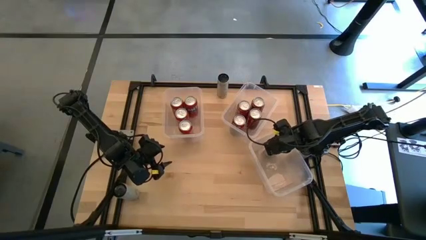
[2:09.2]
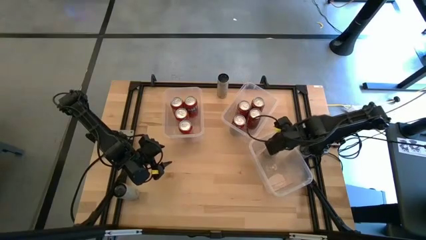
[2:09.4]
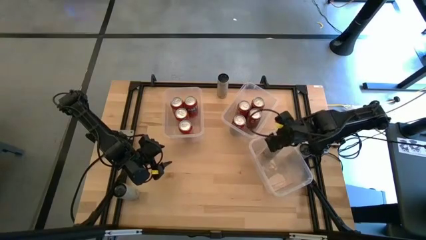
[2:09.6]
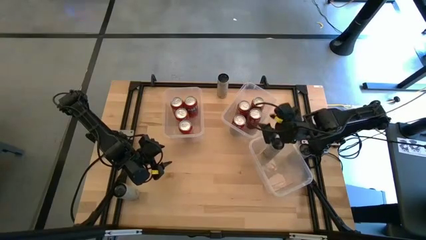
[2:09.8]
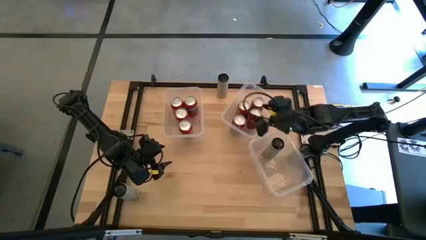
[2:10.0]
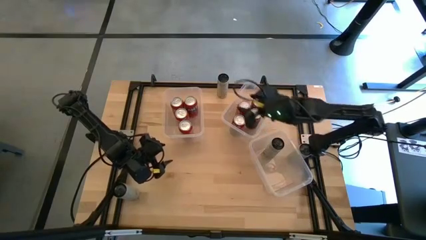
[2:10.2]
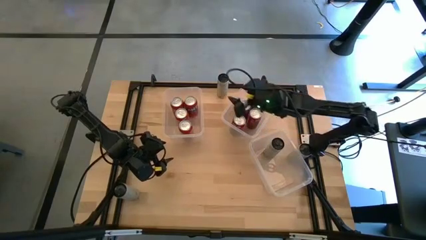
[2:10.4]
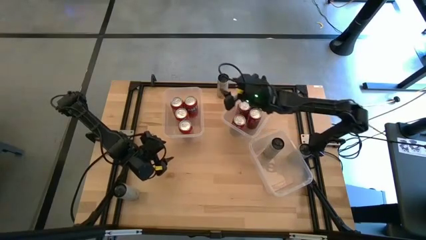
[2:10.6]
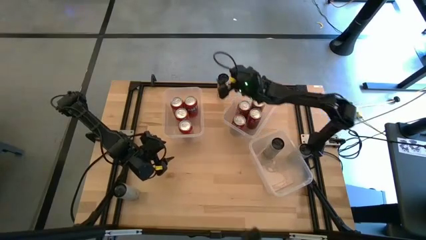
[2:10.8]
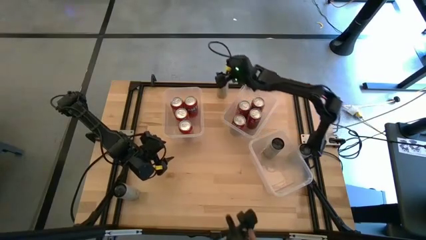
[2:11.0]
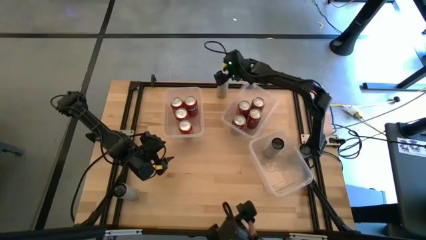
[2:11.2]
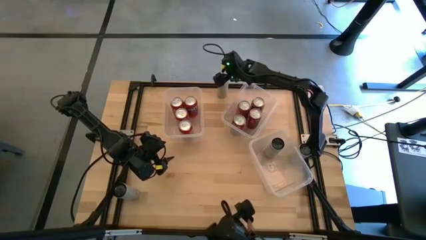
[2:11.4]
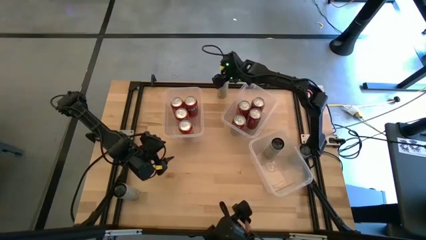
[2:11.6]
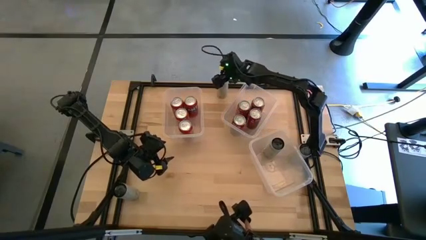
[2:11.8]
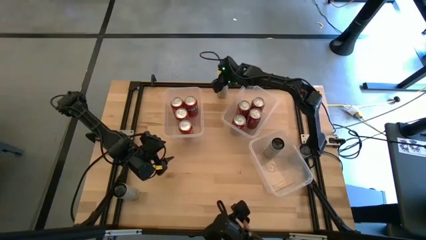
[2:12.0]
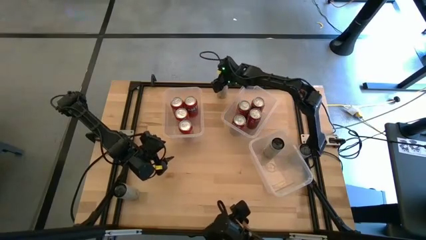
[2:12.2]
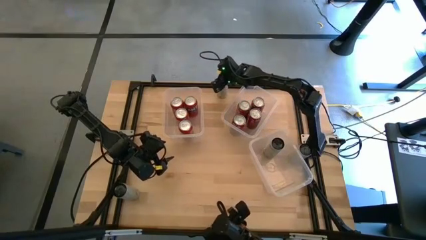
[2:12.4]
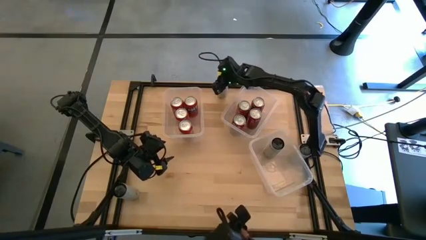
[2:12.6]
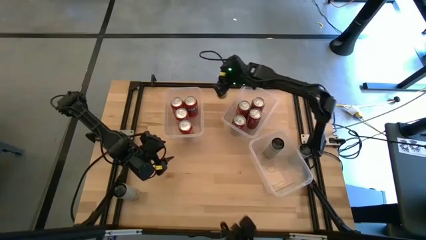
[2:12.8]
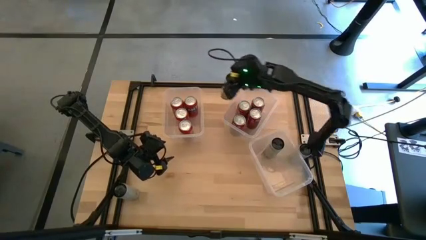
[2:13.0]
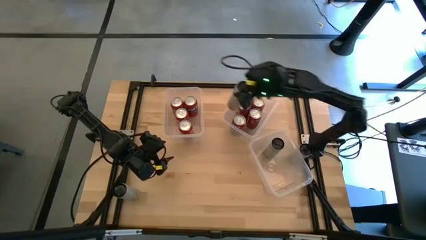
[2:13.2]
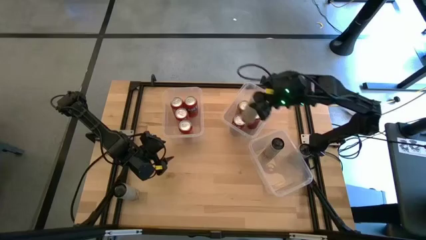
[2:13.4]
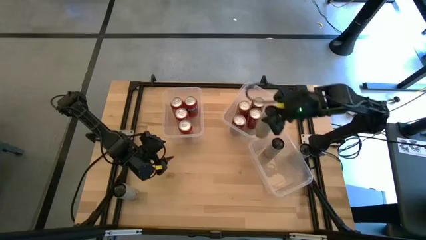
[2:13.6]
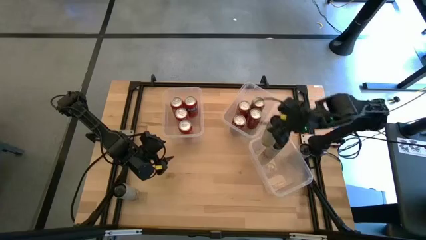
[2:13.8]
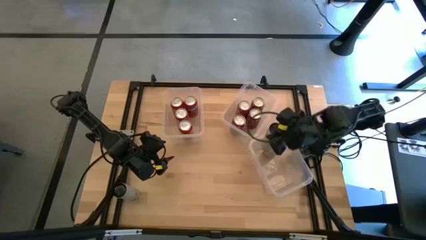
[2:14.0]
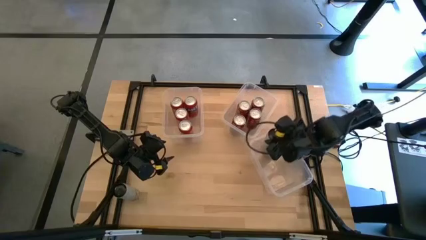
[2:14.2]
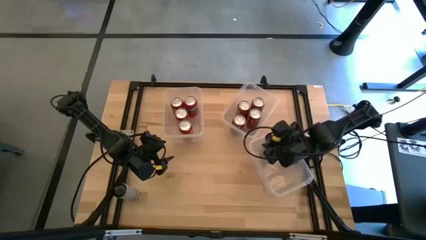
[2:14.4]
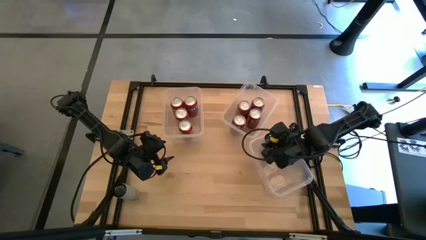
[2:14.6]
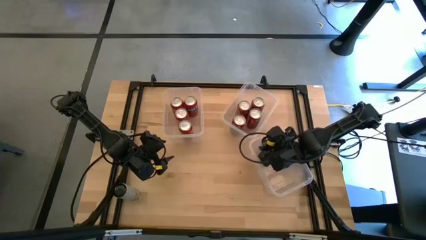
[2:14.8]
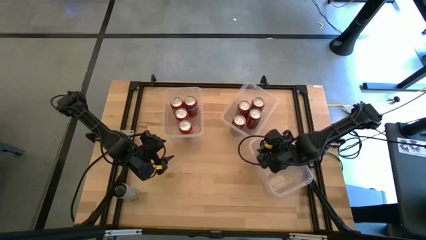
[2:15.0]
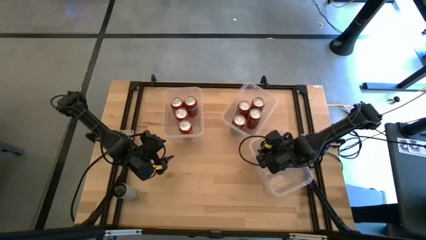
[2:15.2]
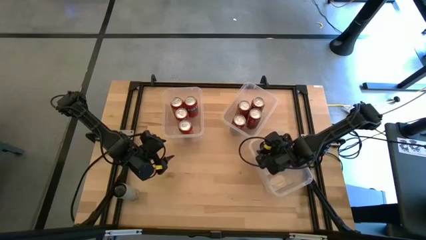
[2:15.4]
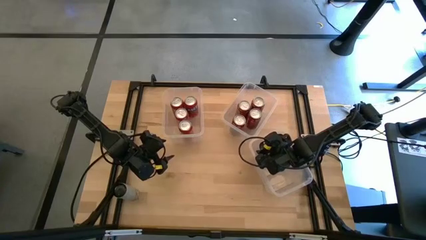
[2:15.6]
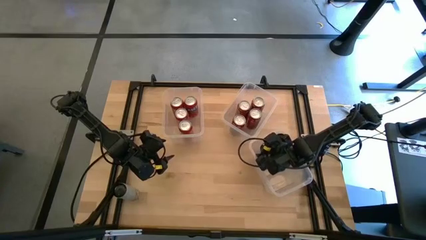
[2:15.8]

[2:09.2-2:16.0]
Task: Sort soda cans
Put the white-yellow soda can into the bottom transparent bin

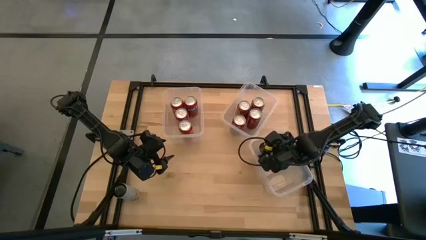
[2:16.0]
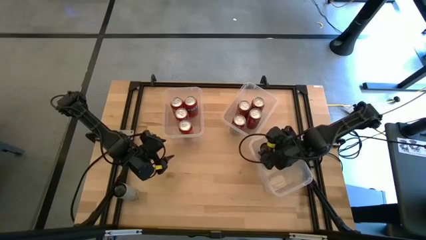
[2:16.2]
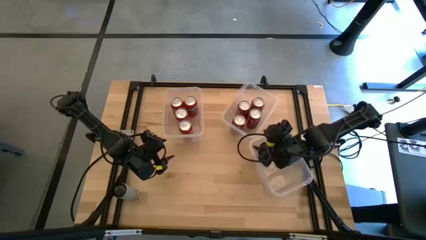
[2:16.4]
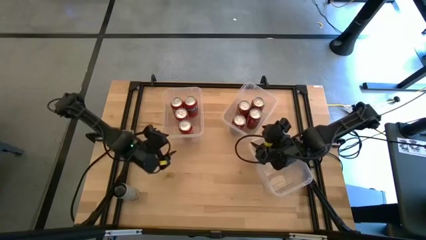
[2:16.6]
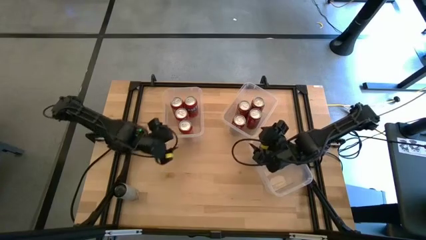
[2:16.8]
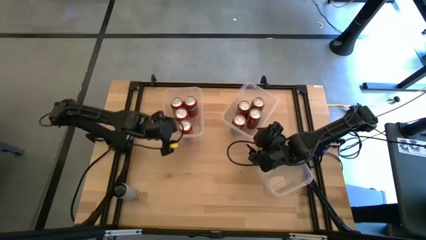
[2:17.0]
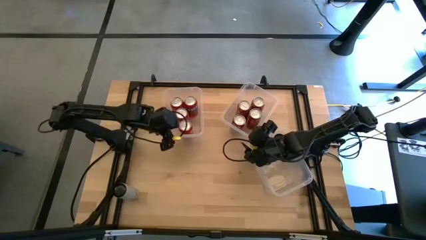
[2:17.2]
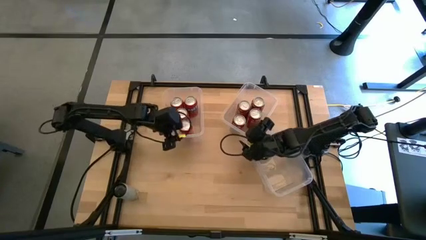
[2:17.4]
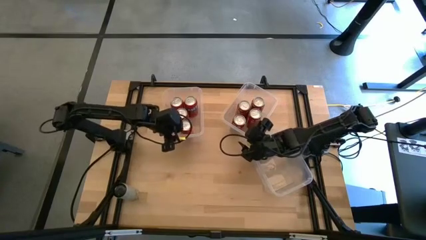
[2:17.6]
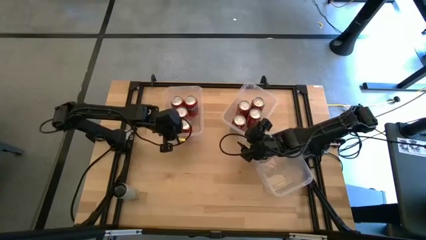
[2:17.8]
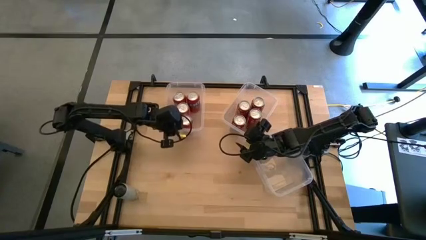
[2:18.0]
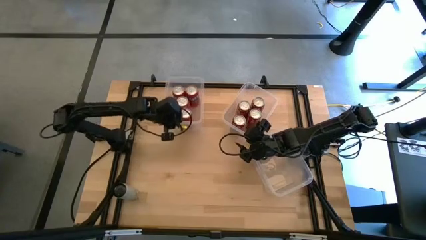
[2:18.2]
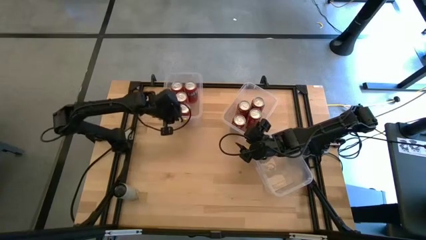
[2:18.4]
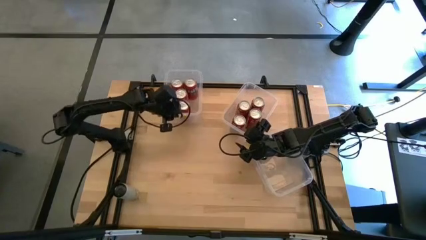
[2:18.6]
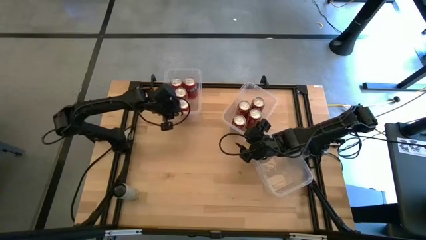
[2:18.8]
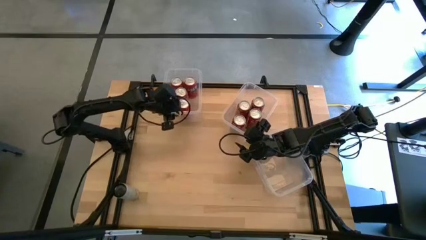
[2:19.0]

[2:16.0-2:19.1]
Adjust the top left transparent bin

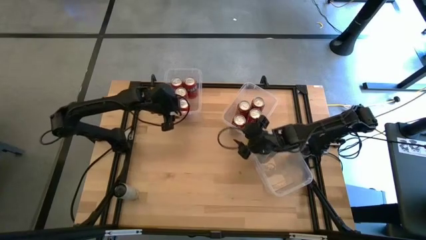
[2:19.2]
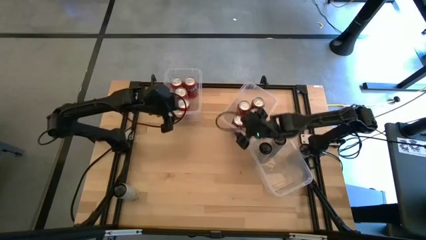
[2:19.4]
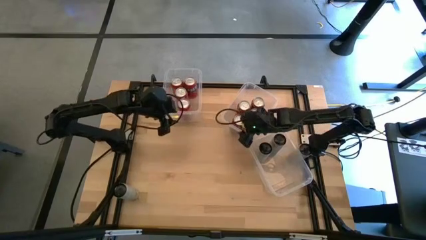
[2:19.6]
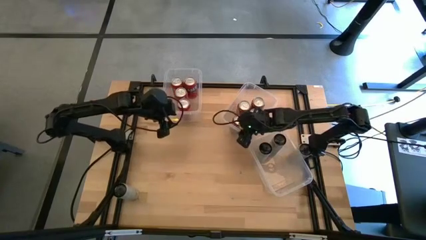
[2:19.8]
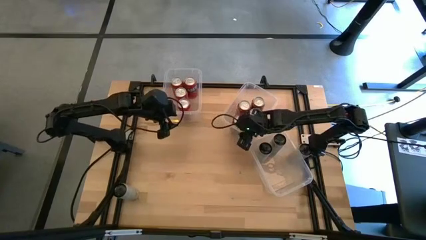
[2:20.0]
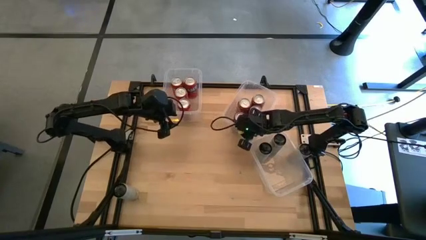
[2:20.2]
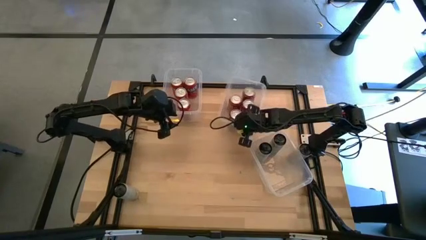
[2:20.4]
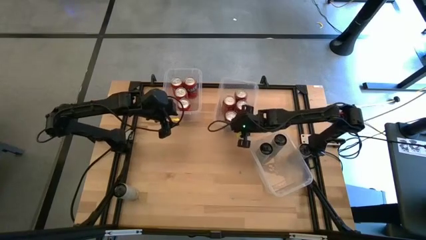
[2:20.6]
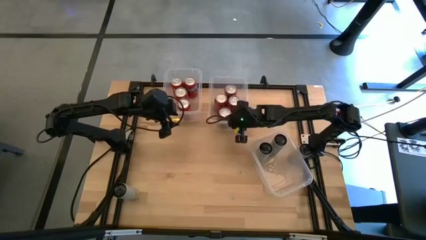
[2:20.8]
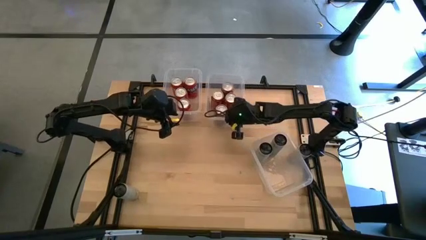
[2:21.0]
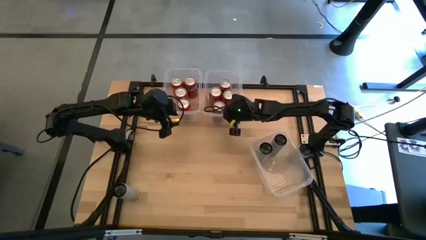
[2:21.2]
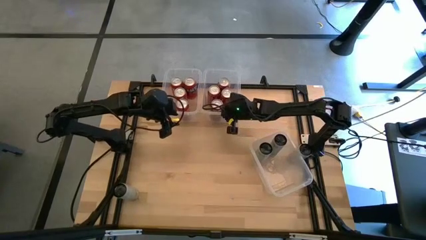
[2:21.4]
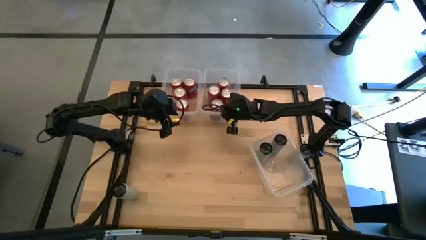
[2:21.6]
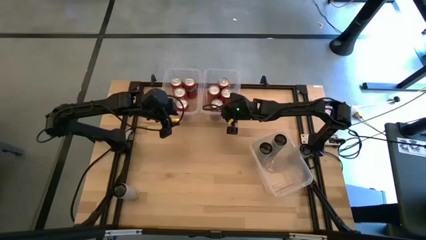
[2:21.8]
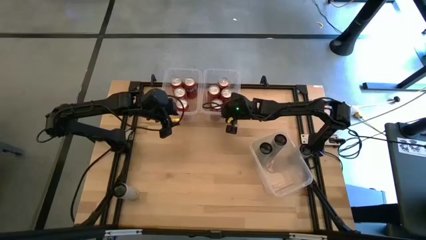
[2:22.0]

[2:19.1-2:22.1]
Adjust the top right transparent bin

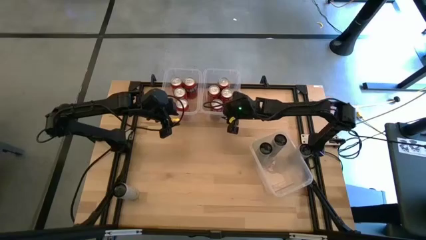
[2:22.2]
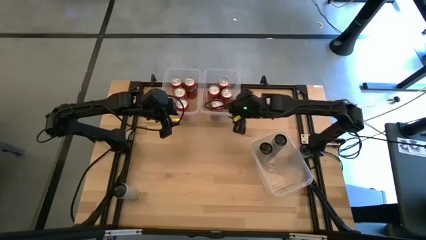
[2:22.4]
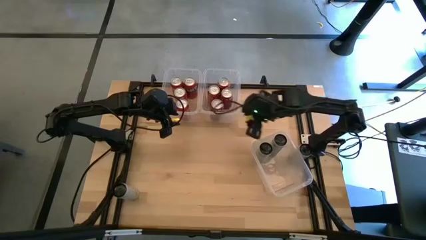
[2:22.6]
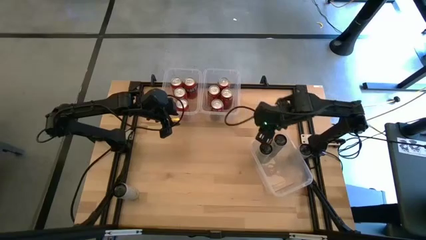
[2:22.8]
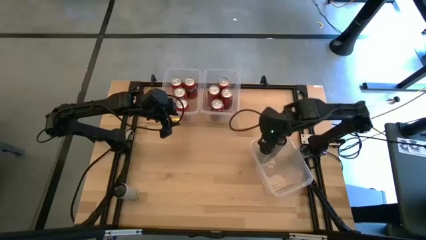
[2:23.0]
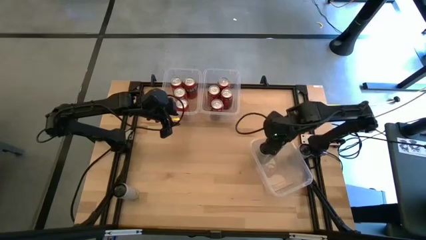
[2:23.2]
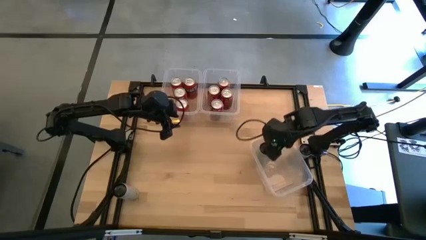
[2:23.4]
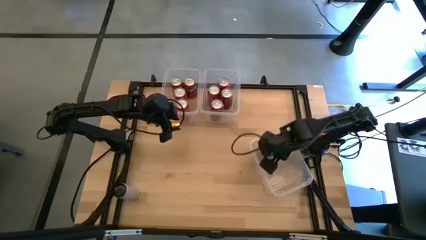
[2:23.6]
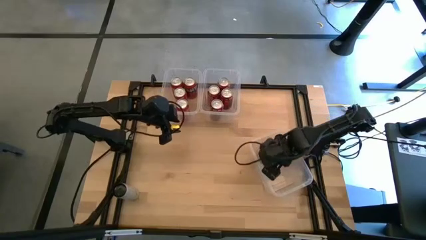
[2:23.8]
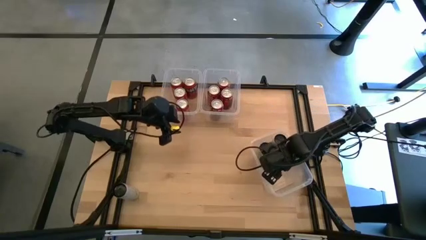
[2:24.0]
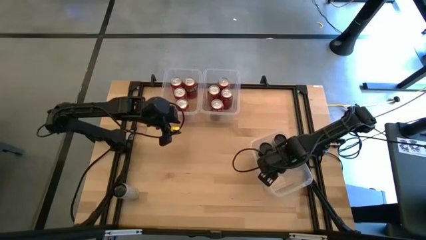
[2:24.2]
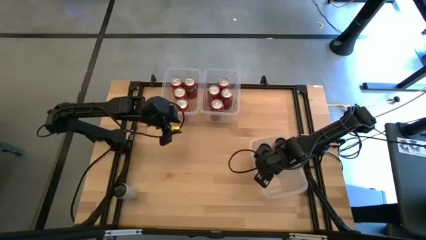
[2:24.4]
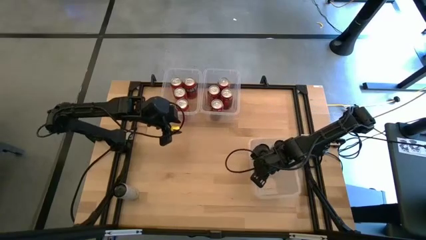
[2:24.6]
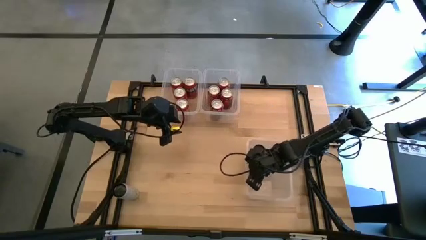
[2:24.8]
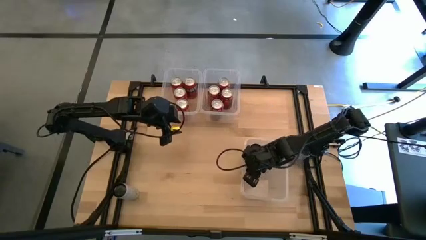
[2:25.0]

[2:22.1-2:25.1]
Adjust the bottom transparent bin
